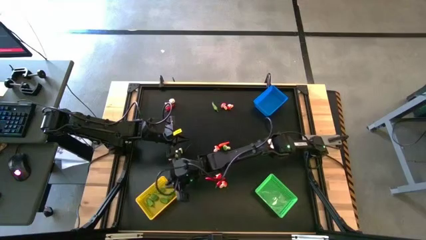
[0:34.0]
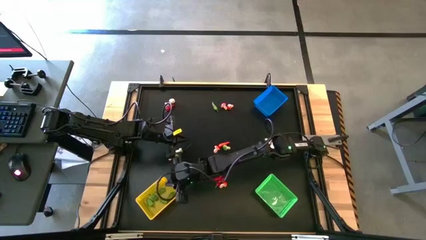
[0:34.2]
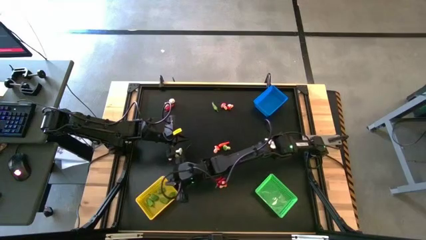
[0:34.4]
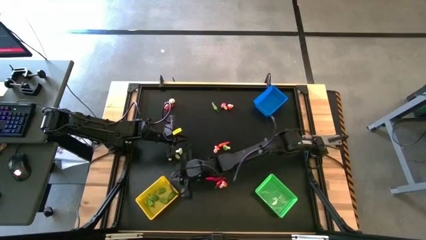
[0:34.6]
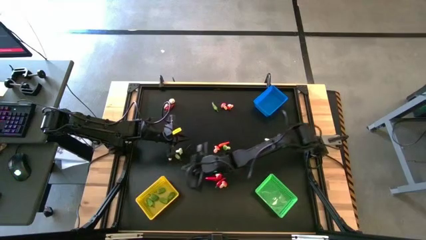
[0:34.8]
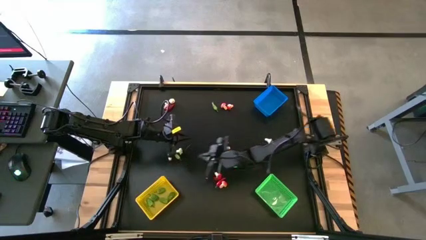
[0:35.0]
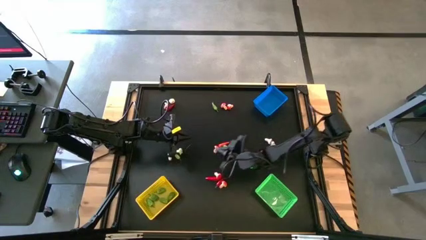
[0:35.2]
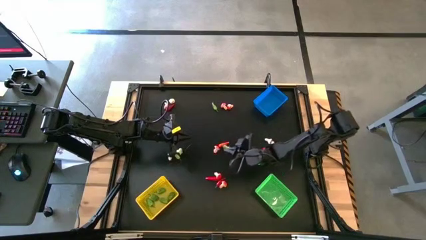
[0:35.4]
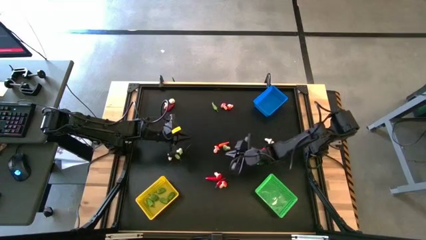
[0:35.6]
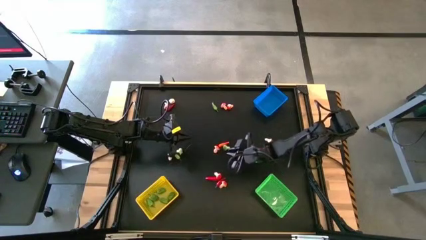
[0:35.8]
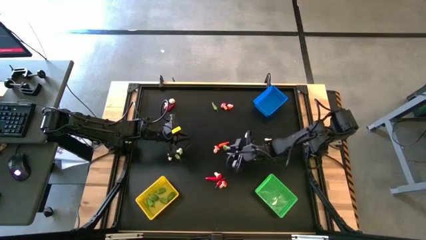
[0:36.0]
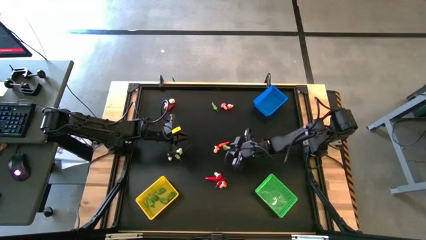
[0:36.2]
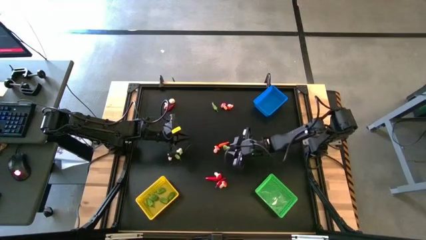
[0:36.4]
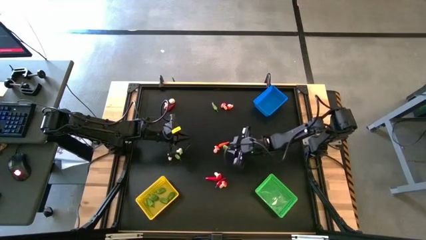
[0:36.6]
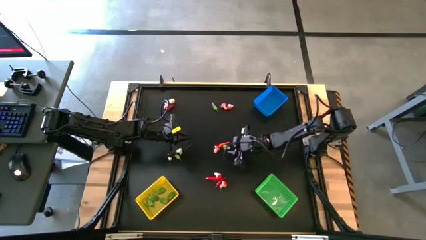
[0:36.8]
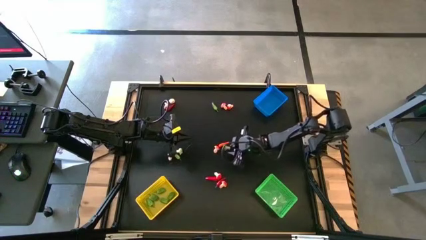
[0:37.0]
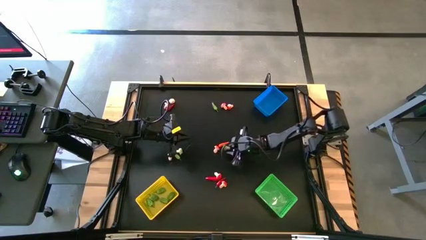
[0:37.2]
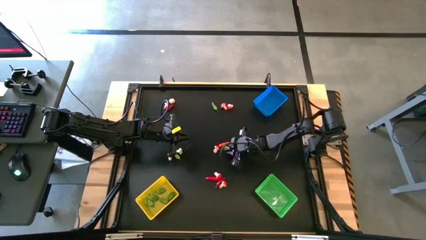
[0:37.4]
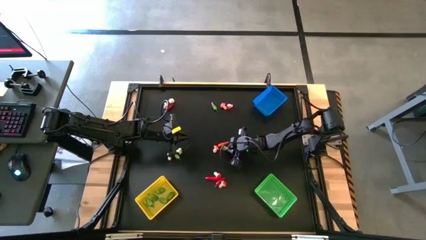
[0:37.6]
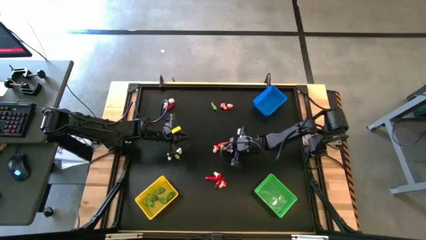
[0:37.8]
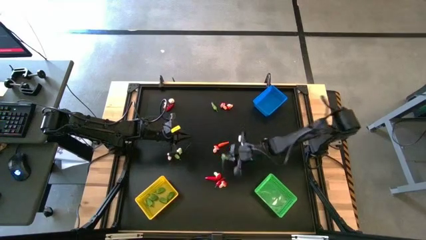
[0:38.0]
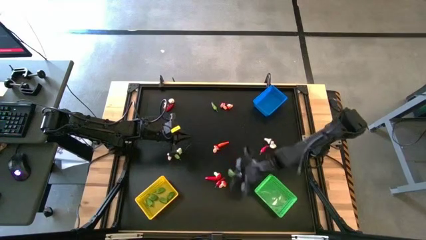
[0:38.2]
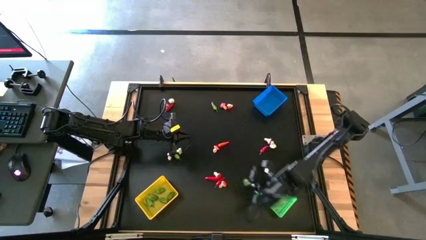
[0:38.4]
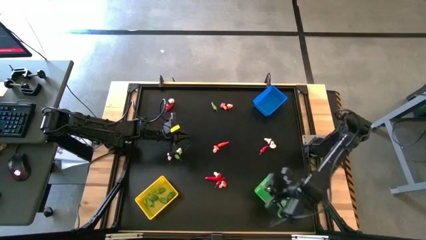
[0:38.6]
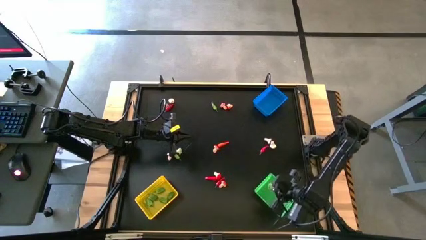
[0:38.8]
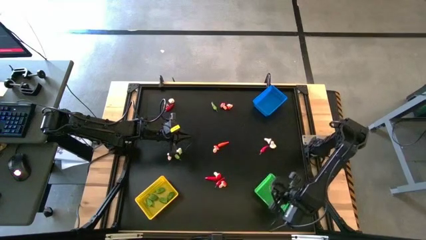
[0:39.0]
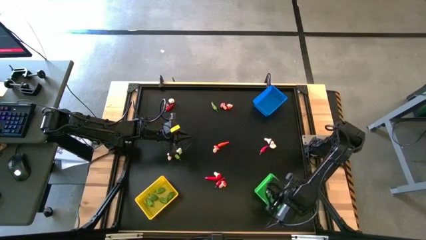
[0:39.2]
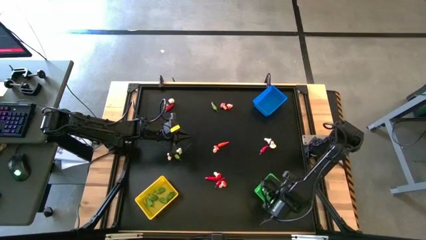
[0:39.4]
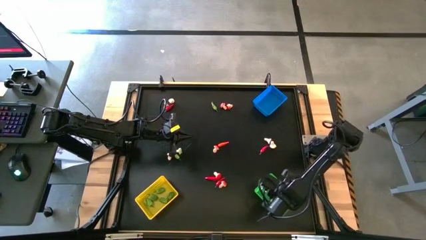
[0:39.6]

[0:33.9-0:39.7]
Task: Sort produce into baskets
Put the green broccoli into the green bin

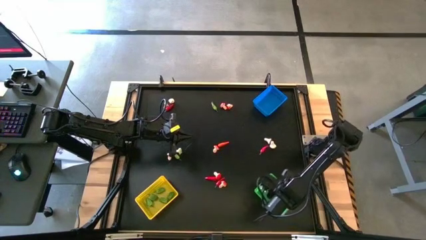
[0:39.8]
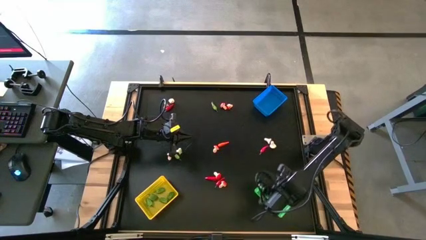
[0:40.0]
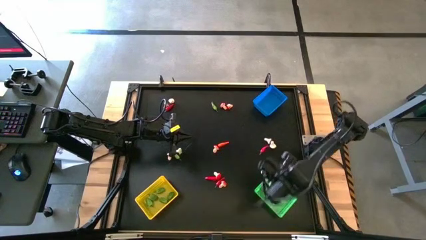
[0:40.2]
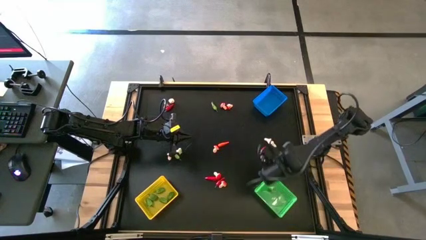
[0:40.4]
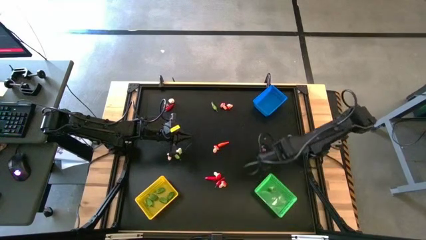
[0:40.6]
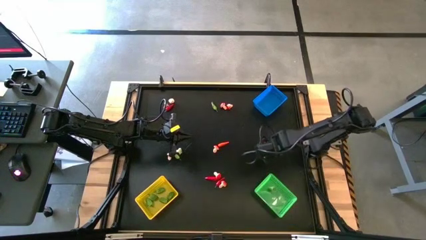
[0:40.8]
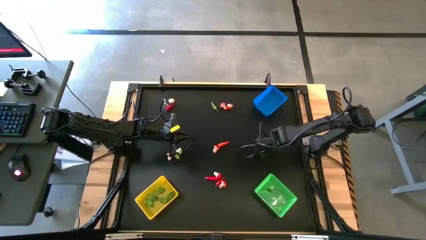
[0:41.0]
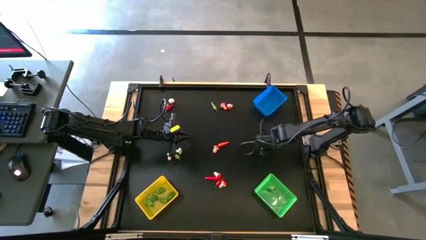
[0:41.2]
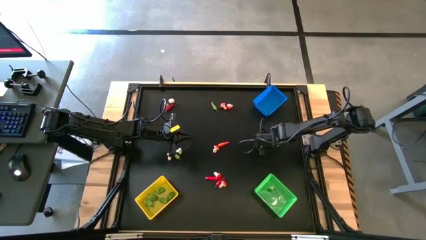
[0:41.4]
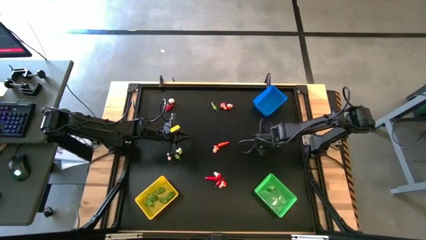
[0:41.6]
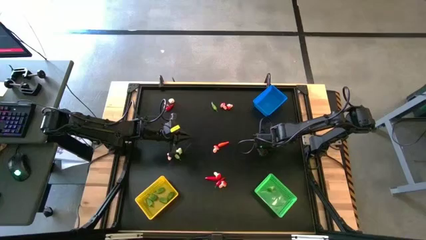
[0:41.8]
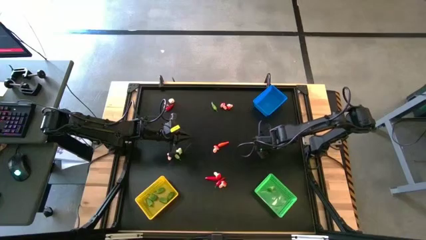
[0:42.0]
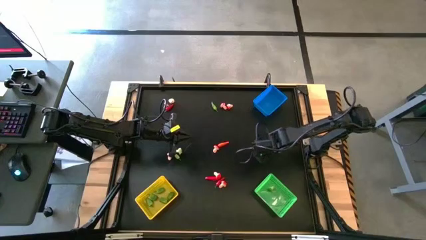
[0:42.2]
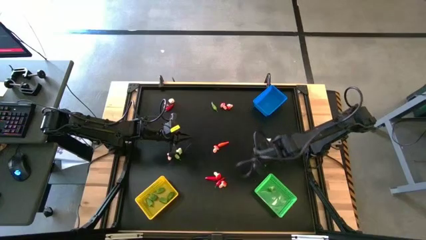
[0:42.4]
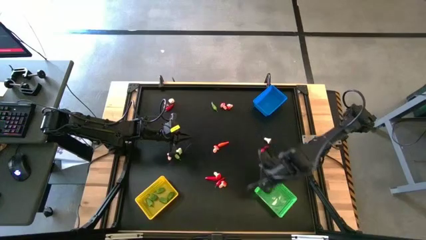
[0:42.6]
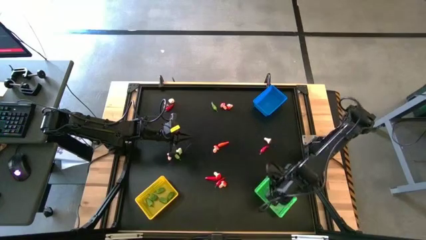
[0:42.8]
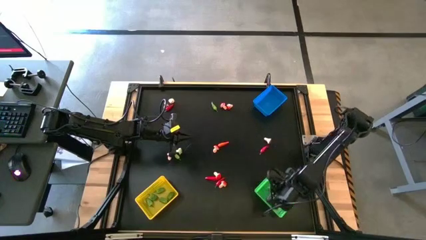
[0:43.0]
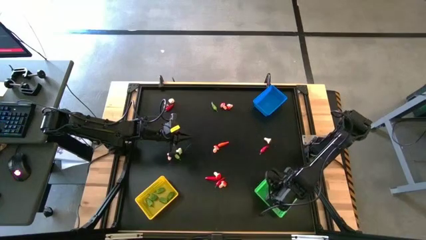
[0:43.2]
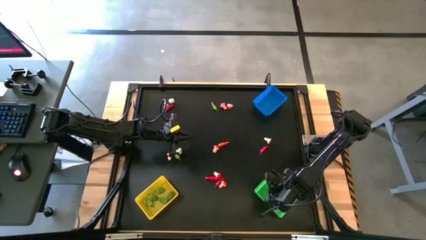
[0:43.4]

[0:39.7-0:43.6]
Put the green broccoli into the green bin

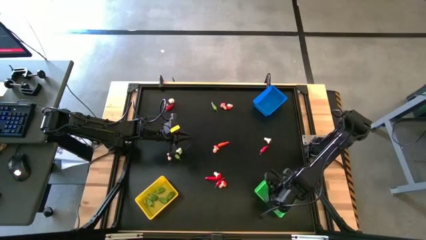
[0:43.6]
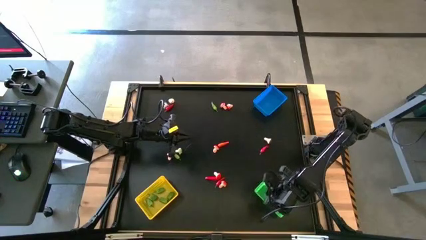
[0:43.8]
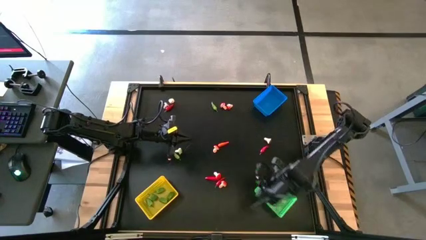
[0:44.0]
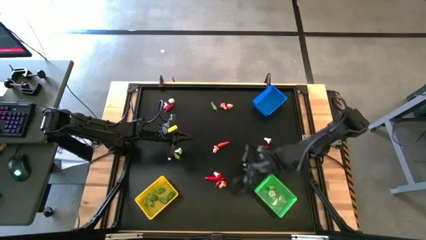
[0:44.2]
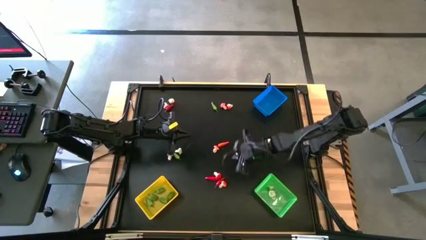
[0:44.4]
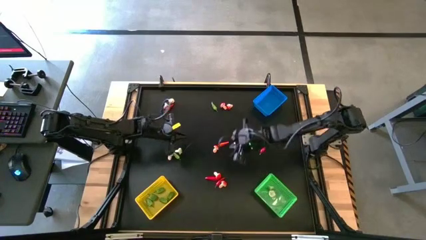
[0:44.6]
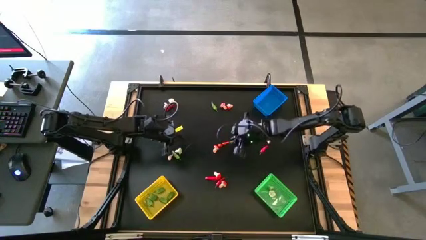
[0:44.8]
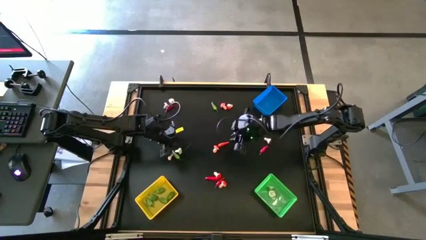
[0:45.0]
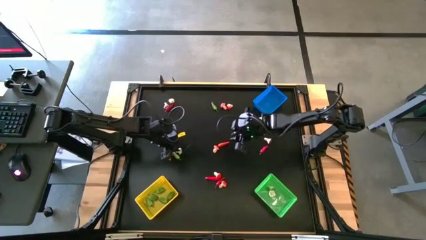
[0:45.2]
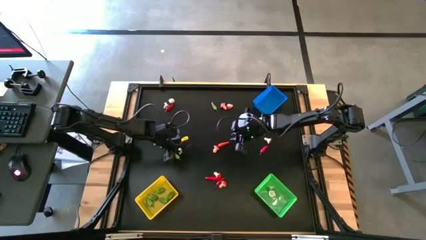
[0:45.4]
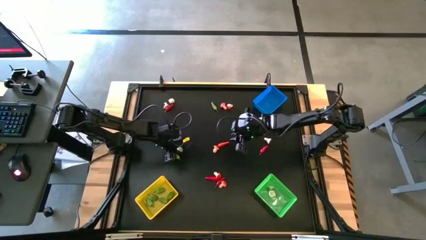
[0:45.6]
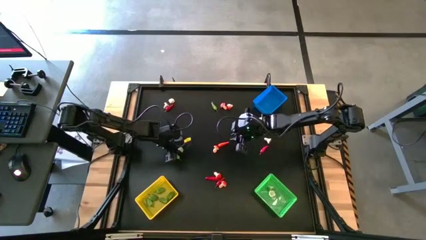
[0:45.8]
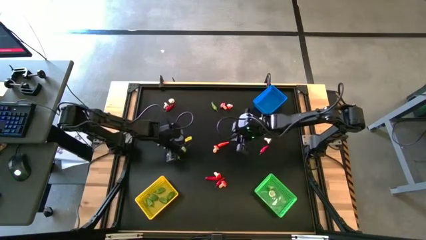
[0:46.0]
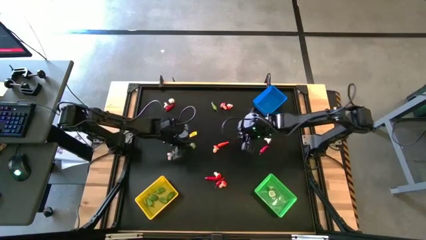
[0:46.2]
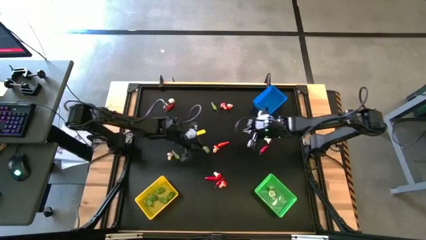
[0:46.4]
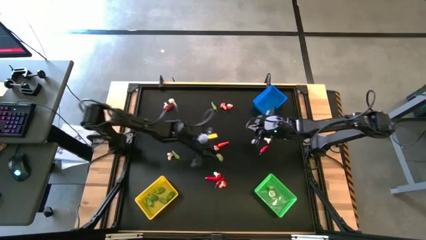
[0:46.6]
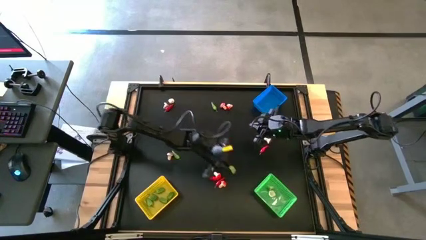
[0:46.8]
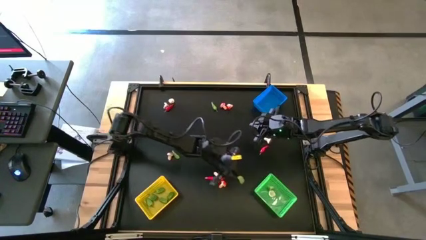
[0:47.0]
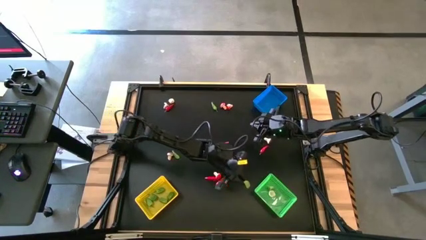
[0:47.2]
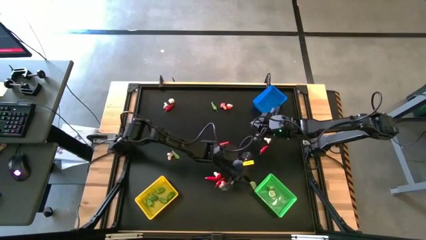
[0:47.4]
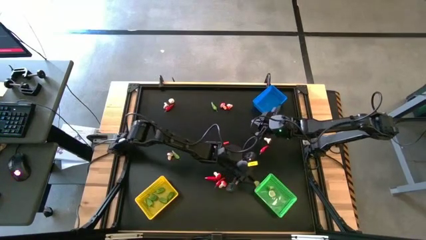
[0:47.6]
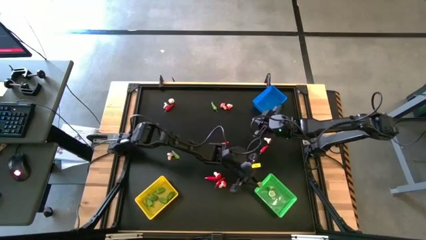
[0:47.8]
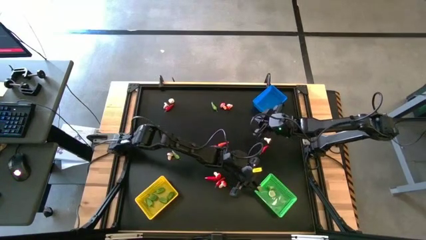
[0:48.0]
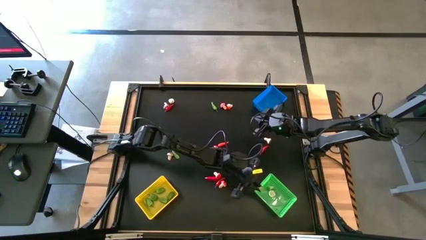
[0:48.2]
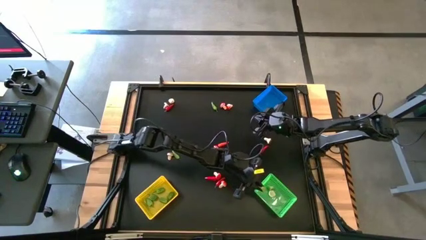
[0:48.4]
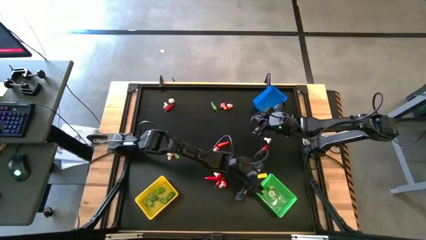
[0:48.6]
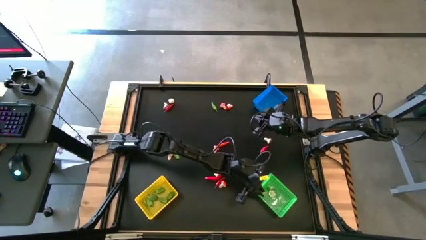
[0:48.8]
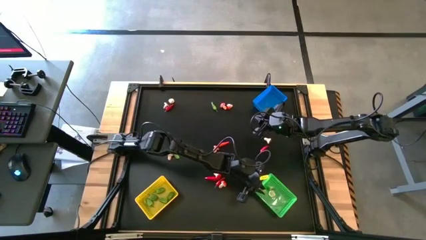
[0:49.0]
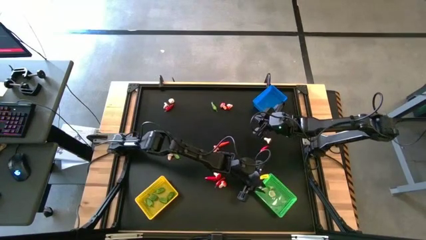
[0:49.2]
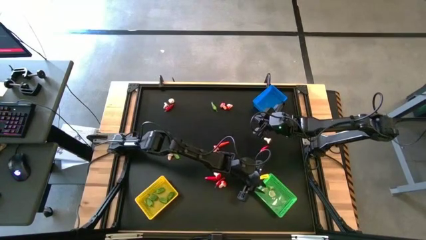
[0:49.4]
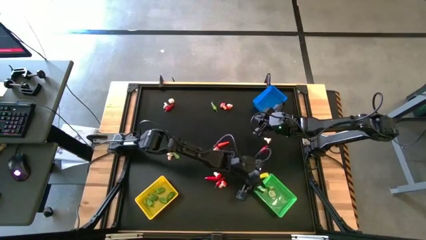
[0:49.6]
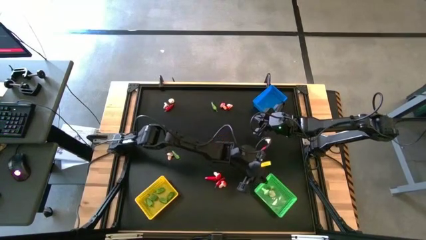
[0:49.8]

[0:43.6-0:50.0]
Put the green broccoli into the green bin

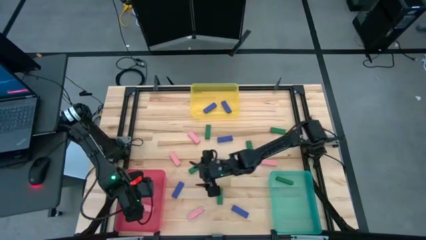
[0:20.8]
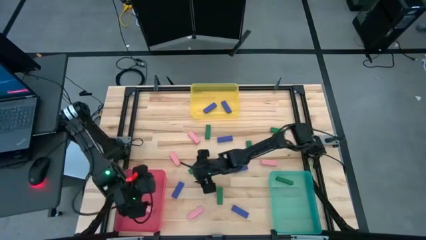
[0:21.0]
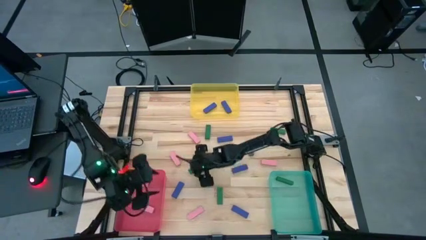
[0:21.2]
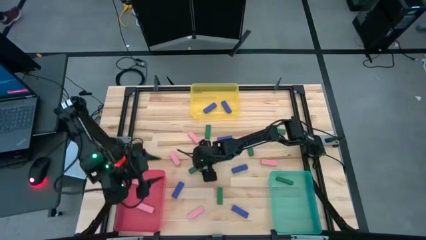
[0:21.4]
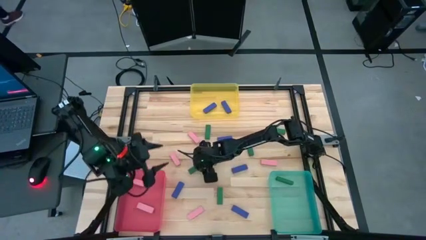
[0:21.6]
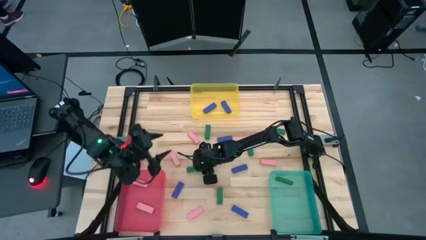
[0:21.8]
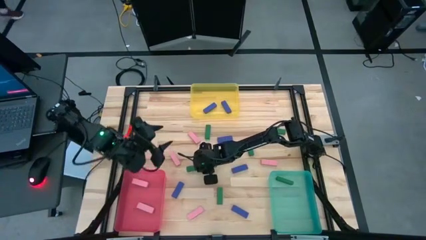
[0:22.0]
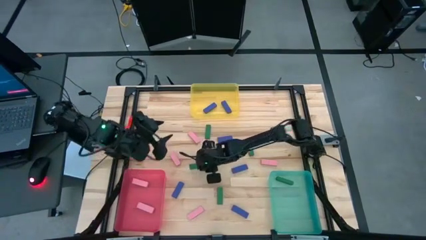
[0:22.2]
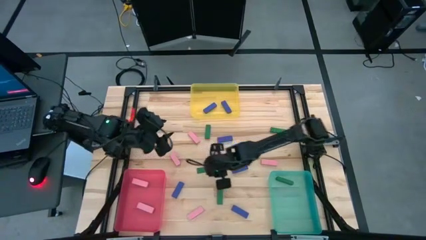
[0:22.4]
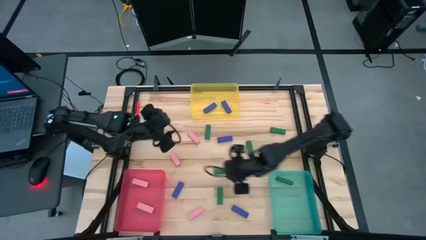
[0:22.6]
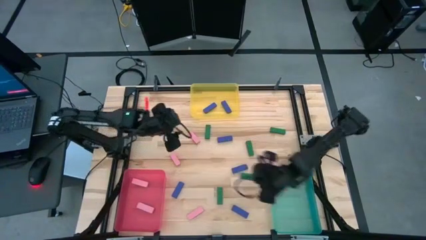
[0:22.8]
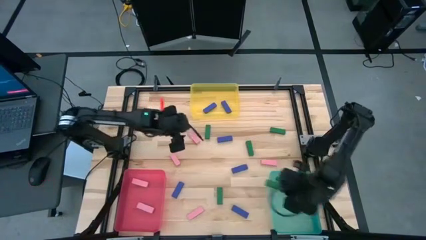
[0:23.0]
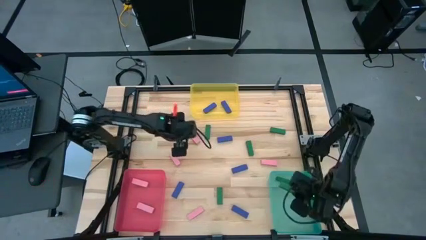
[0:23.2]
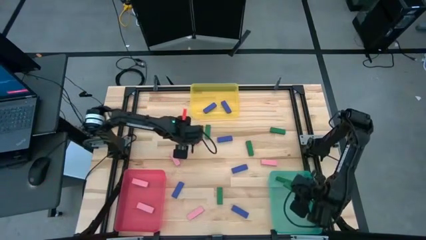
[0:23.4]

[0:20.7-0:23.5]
Task: Sort blocks
Put the green block into the light green bin
